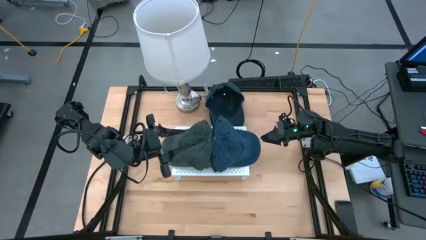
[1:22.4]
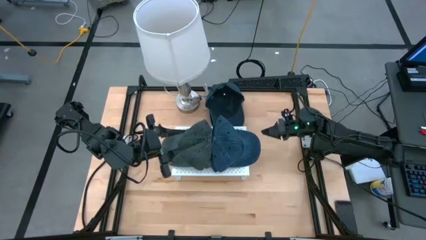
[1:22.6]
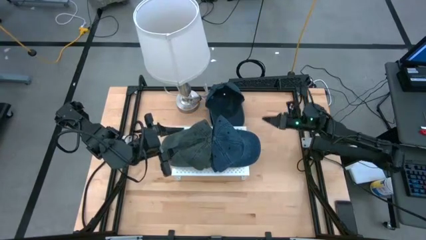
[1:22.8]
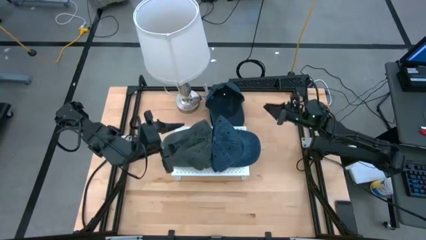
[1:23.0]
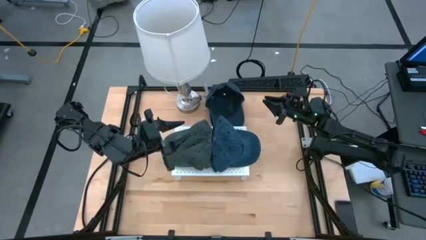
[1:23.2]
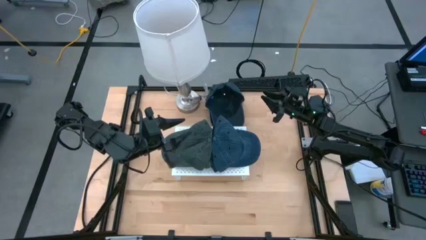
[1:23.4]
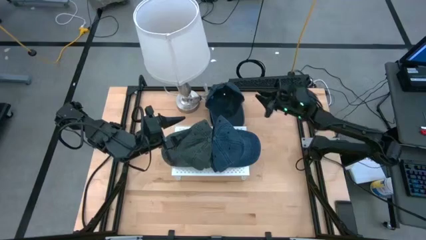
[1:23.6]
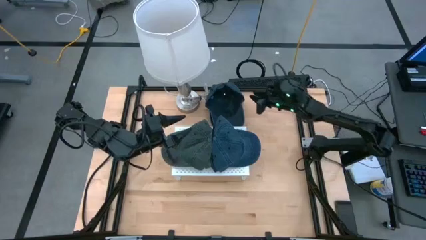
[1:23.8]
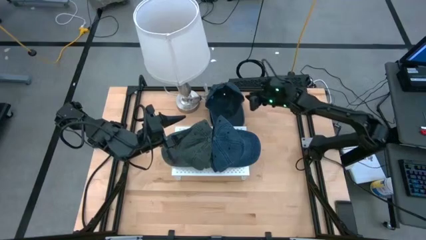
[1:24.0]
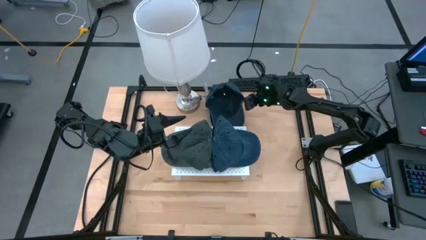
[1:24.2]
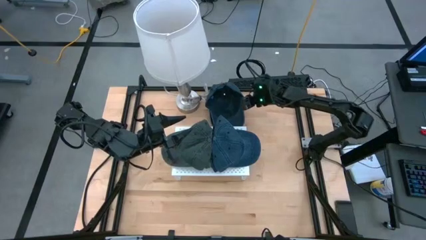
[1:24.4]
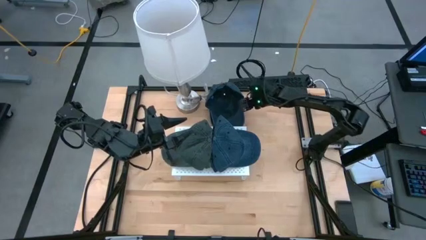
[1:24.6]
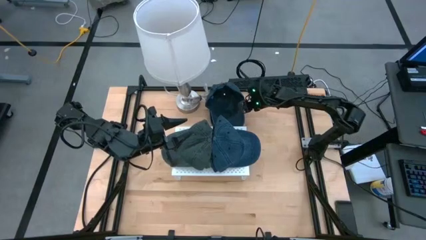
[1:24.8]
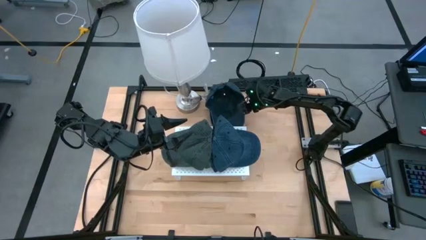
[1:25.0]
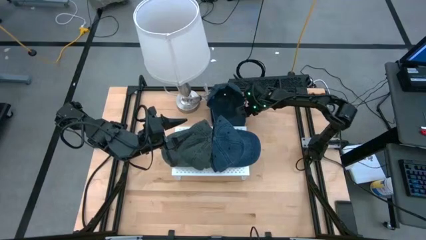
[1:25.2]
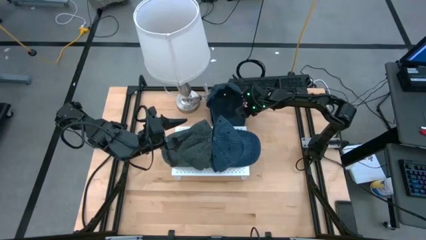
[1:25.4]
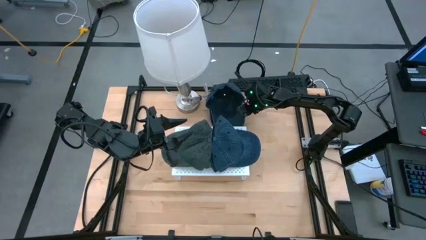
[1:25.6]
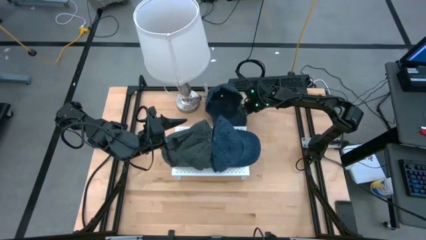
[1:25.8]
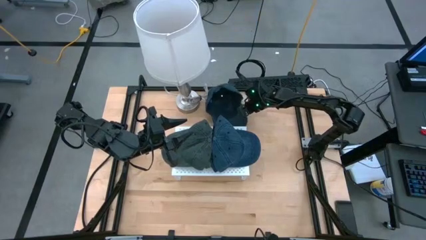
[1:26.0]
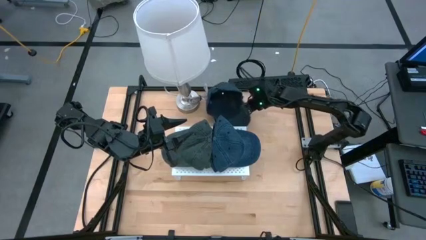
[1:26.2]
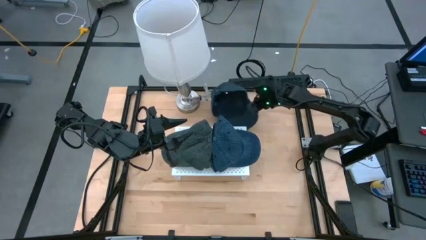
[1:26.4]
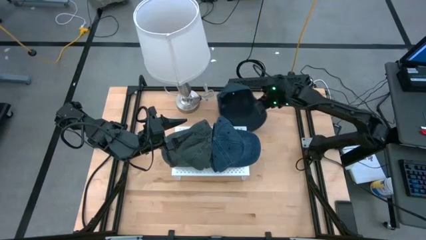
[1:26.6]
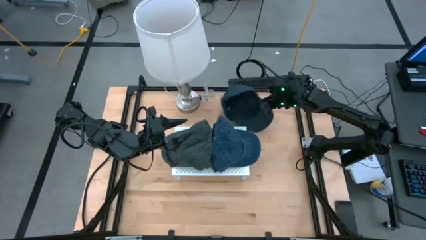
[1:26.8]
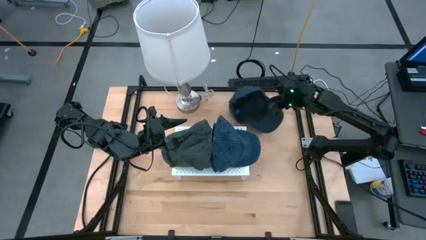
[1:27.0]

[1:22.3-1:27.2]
Task: Pick & Place hat
Stack the blue cap on top of the other blue cap on the shelf

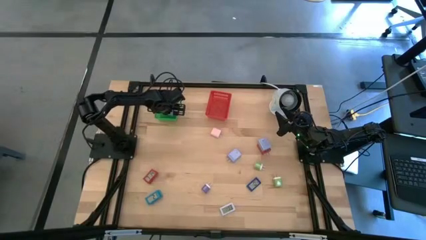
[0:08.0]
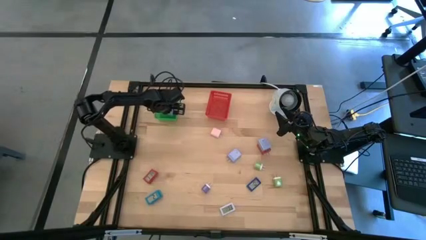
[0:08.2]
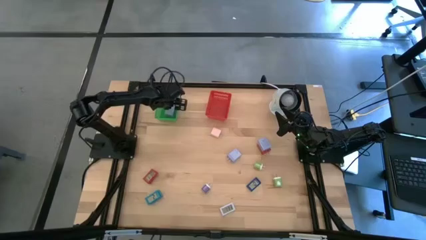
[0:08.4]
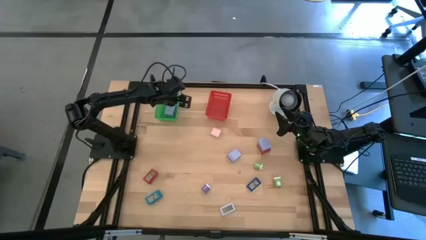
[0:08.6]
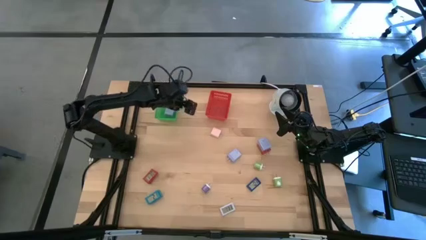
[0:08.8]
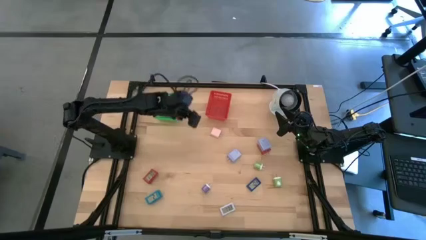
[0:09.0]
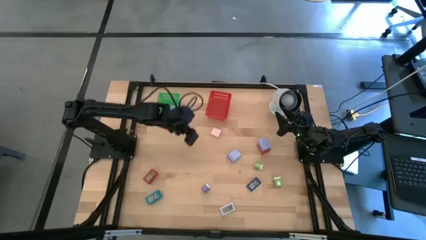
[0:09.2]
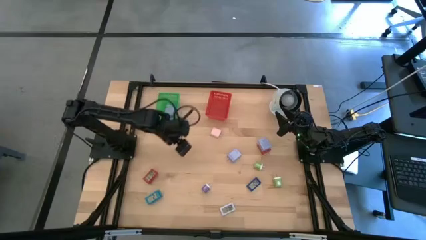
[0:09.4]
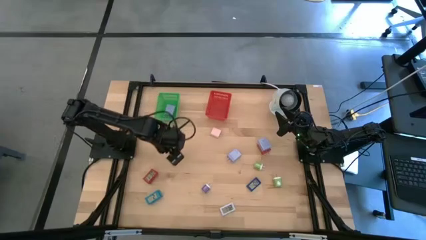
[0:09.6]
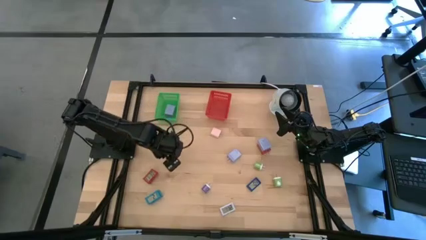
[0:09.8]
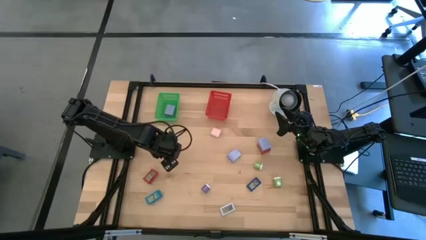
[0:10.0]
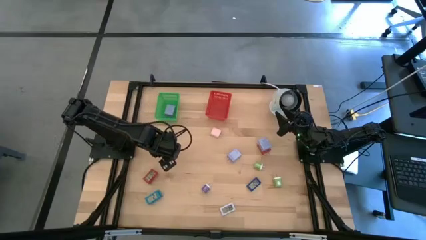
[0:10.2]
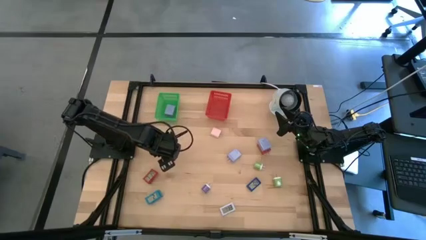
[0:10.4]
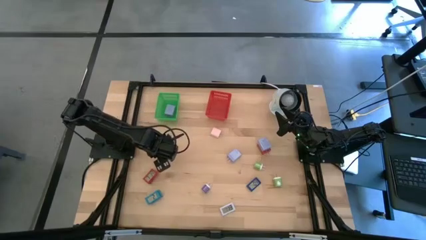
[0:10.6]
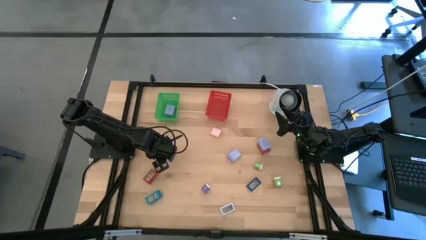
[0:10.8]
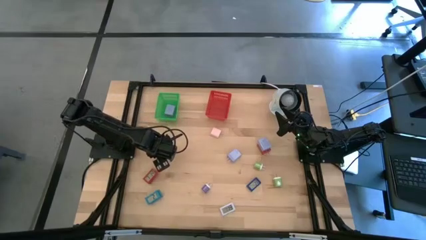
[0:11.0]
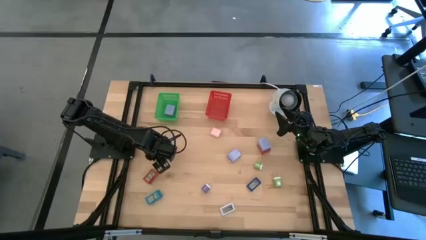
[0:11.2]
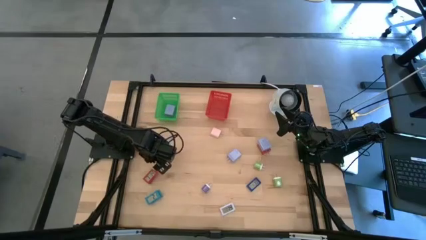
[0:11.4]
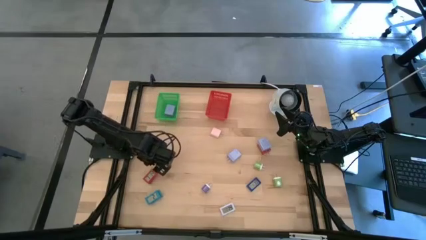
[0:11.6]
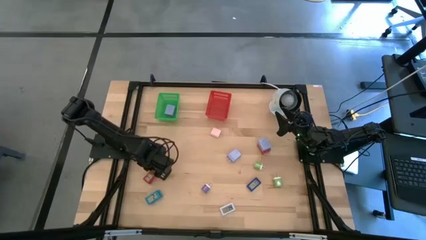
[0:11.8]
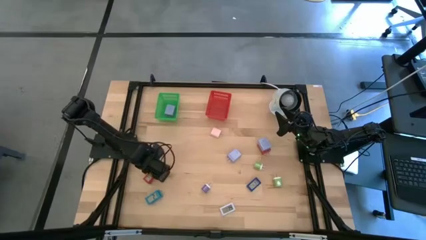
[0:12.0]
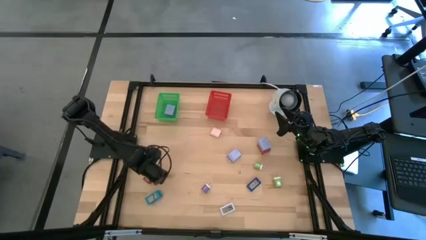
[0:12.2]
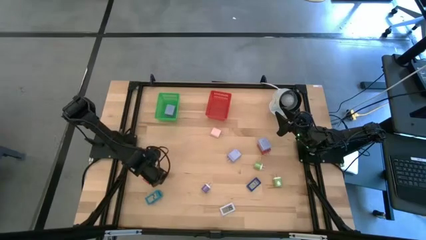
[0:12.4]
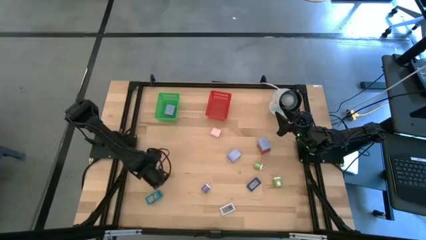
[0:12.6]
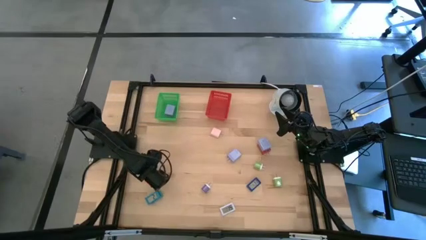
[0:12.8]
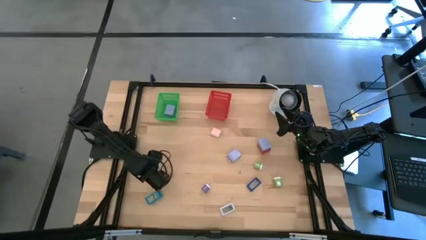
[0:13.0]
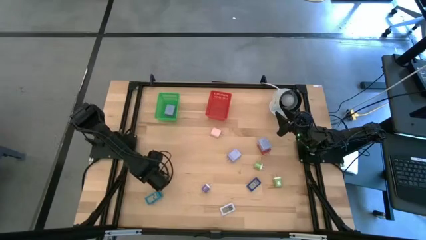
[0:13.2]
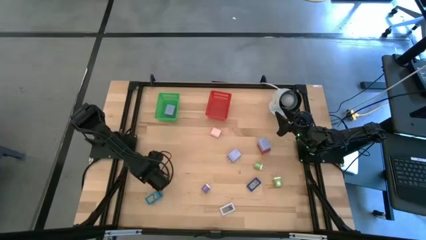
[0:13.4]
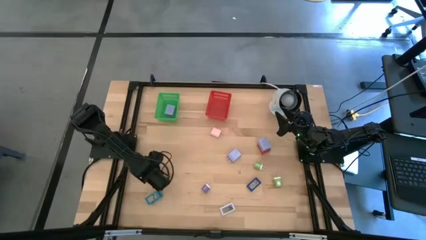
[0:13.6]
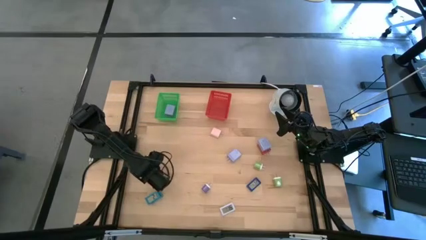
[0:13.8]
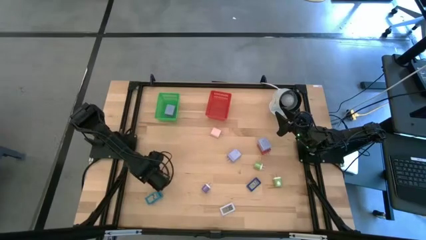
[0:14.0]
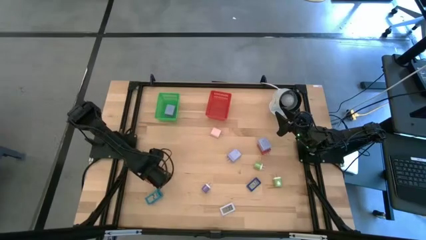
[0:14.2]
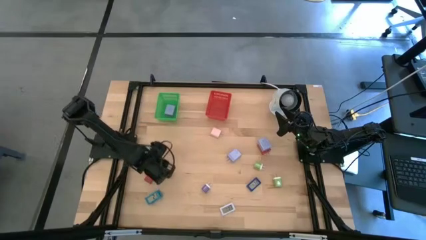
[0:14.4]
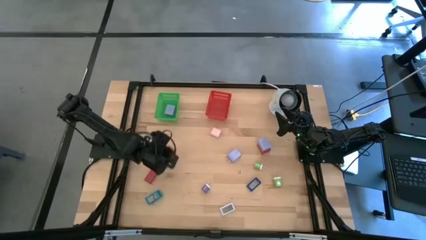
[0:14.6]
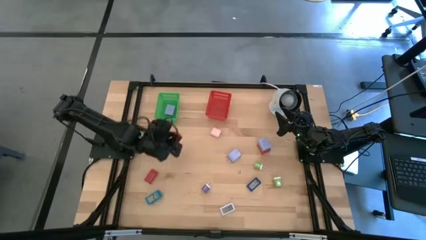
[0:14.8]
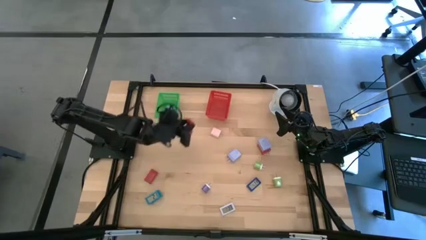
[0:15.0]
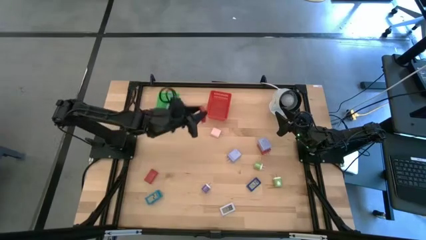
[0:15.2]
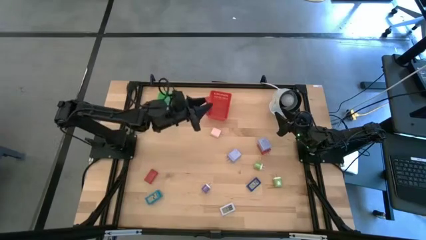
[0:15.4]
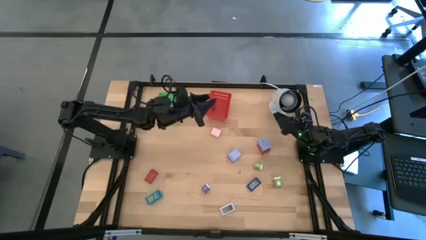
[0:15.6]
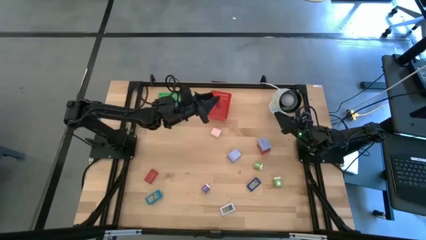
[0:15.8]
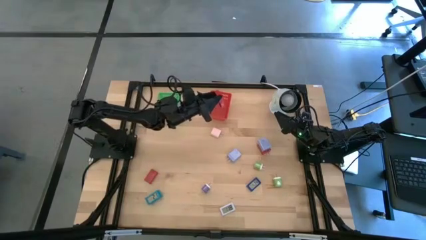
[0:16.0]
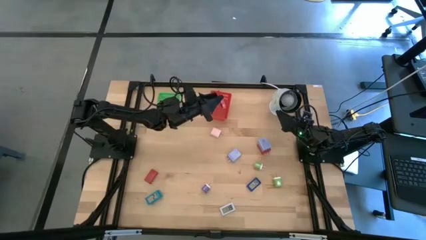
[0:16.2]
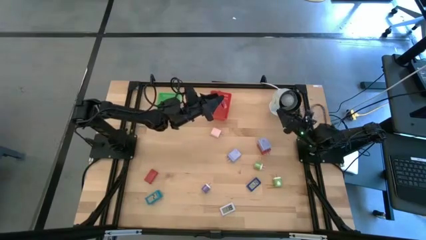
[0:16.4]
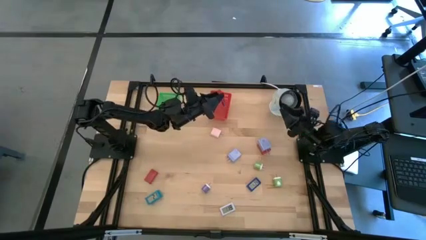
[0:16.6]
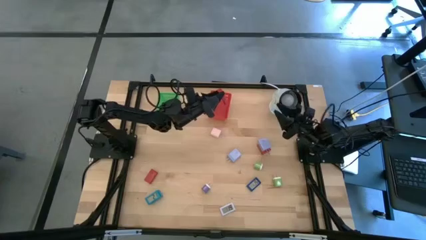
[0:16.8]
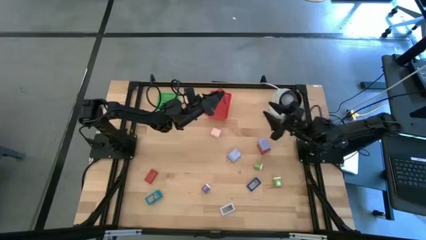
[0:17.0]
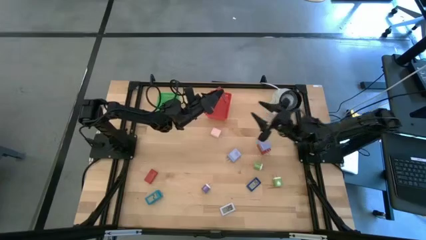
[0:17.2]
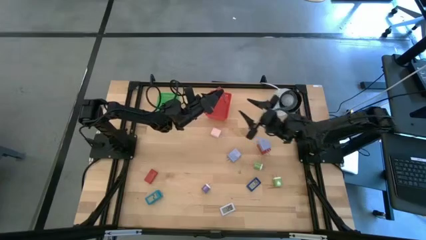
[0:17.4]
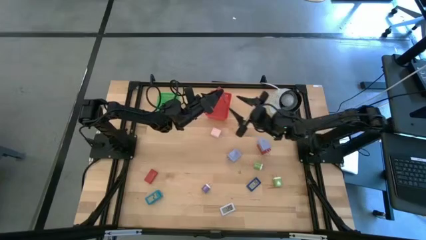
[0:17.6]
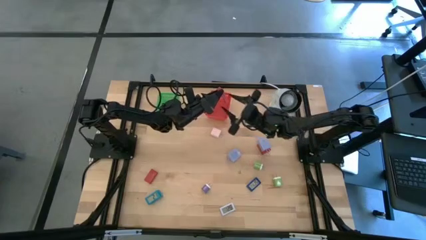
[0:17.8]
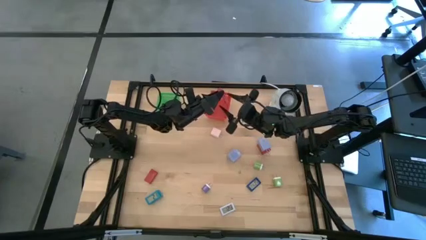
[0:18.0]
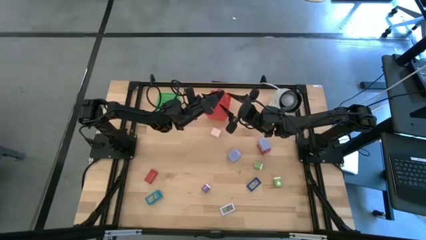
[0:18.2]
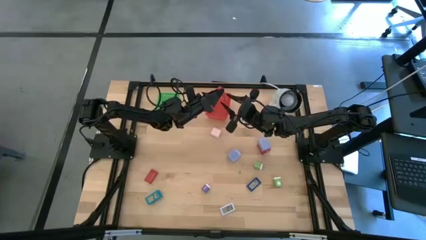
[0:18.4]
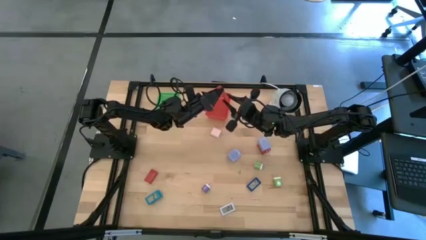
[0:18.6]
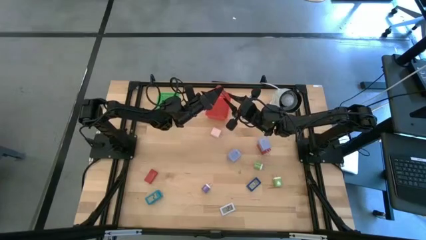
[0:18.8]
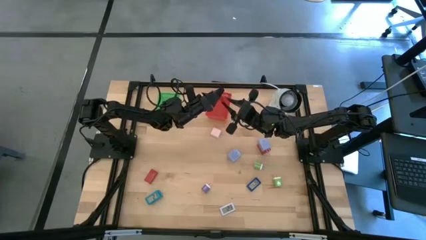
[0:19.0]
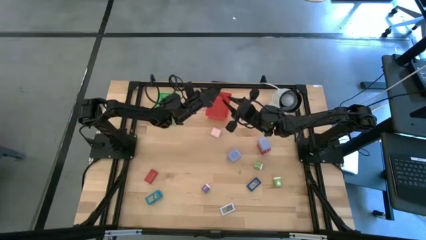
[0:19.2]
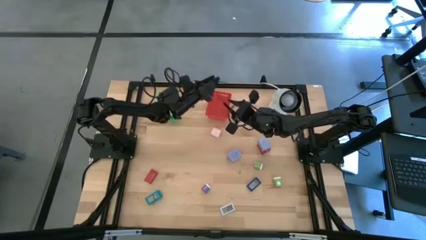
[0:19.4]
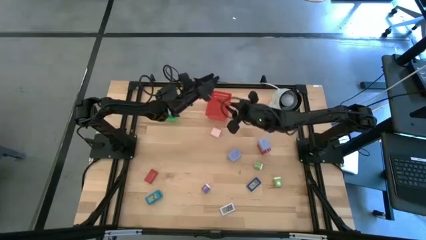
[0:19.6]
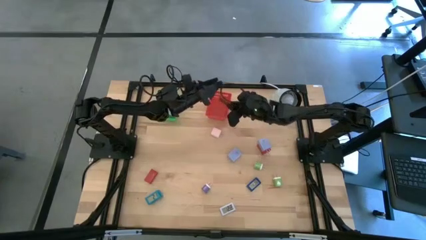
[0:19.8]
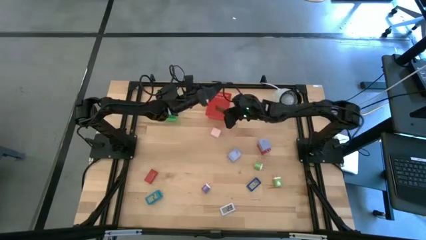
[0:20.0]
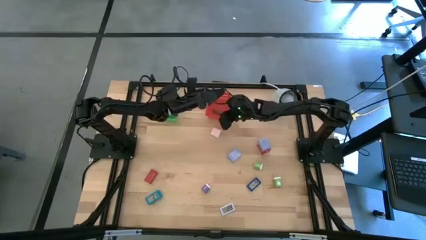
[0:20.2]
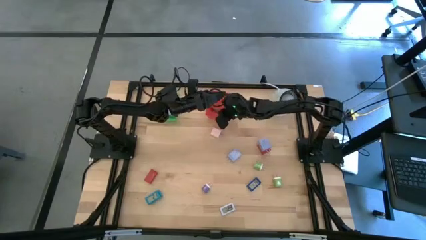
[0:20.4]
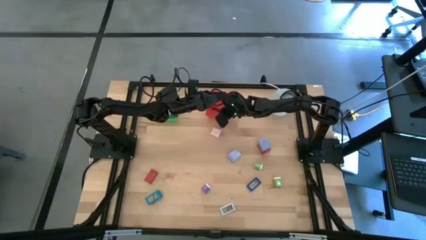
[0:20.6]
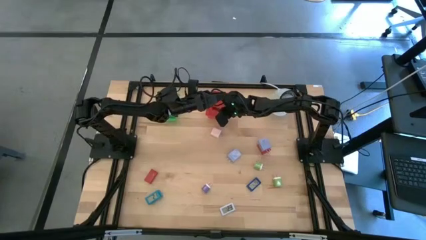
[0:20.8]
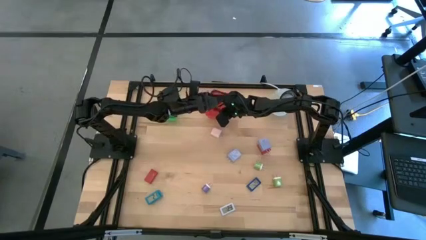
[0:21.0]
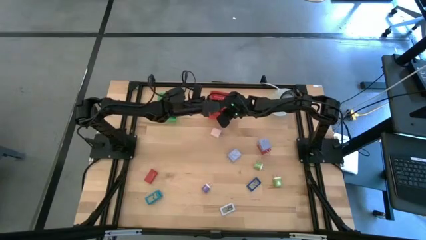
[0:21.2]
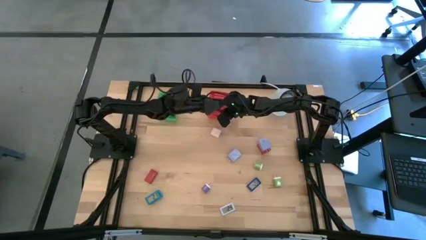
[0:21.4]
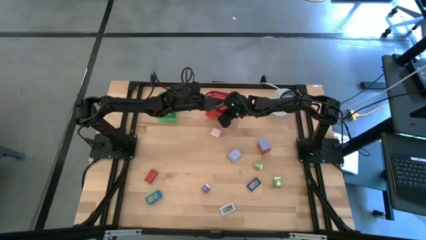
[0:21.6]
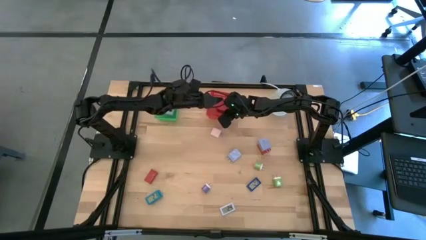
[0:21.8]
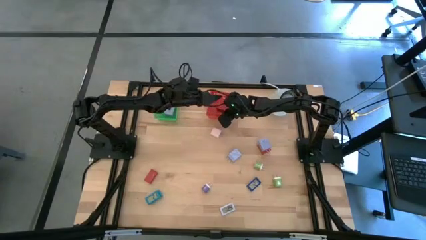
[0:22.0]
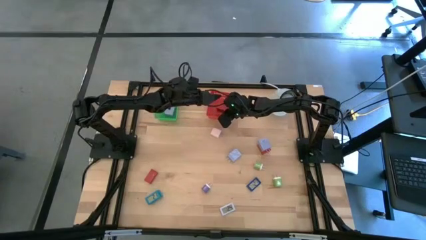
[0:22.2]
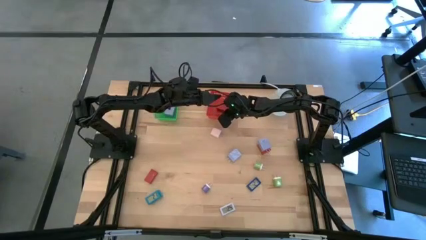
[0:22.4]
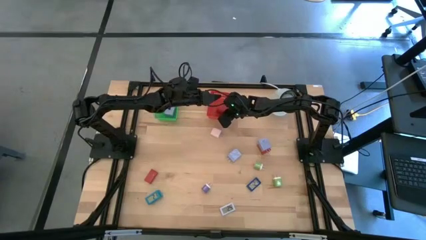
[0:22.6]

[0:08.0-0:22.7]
Task: Pick & Place Office items
Put the top red digital timer into the red bin
